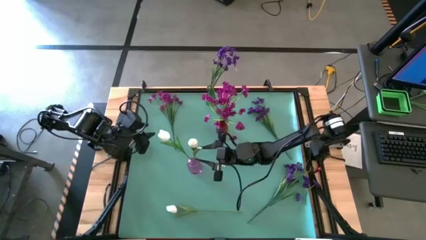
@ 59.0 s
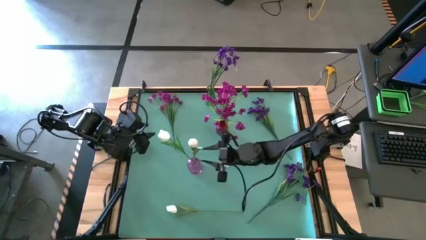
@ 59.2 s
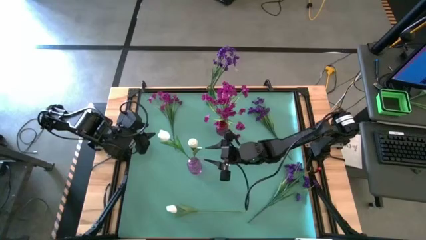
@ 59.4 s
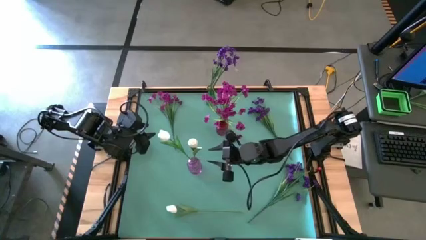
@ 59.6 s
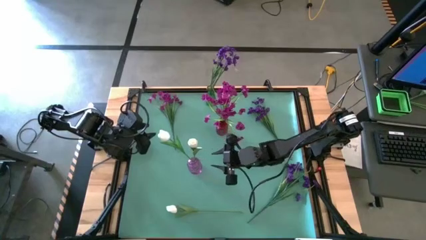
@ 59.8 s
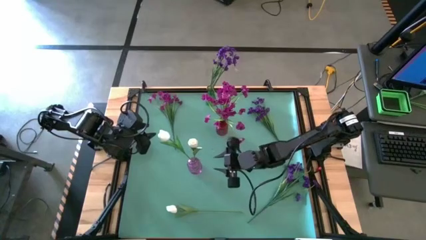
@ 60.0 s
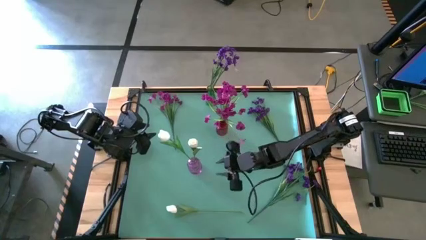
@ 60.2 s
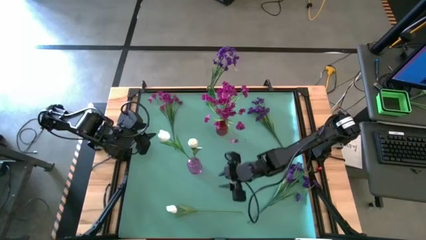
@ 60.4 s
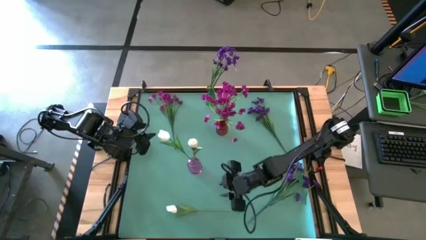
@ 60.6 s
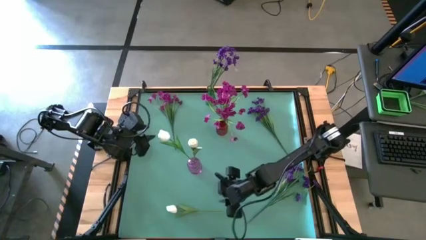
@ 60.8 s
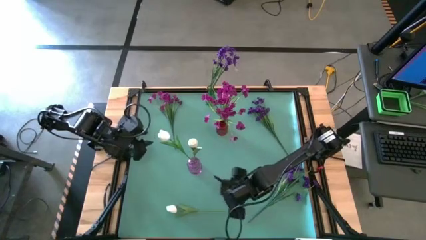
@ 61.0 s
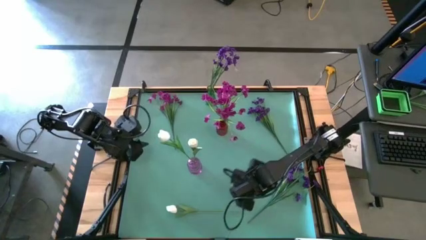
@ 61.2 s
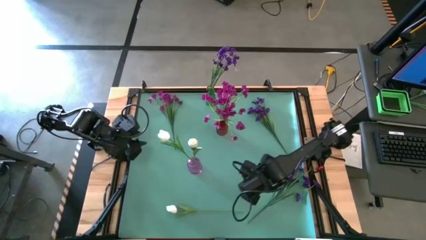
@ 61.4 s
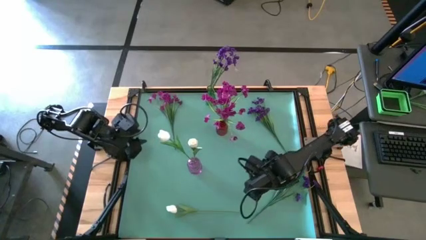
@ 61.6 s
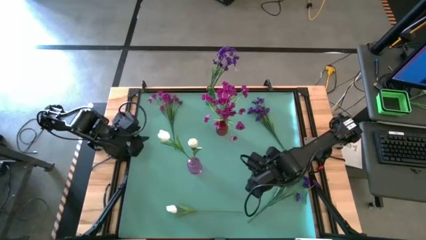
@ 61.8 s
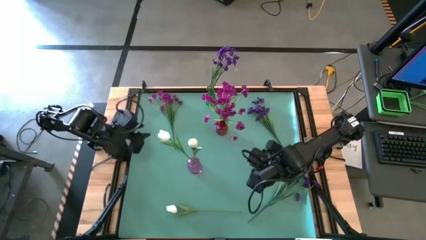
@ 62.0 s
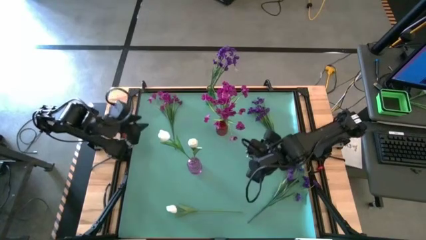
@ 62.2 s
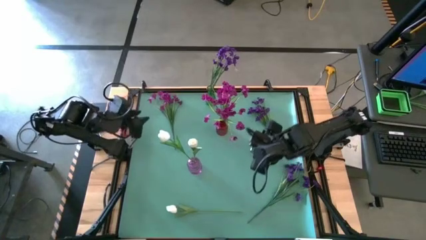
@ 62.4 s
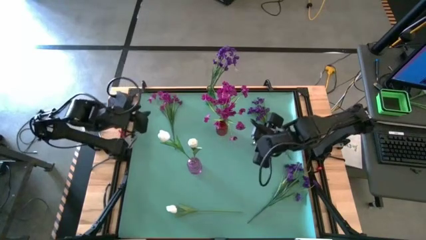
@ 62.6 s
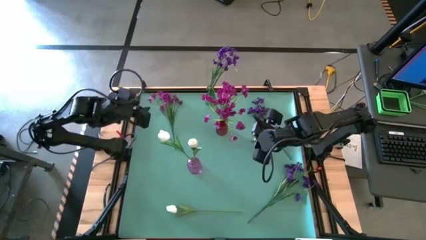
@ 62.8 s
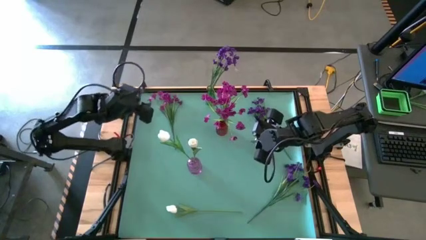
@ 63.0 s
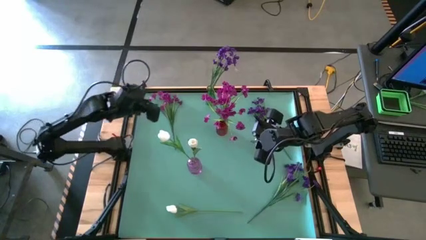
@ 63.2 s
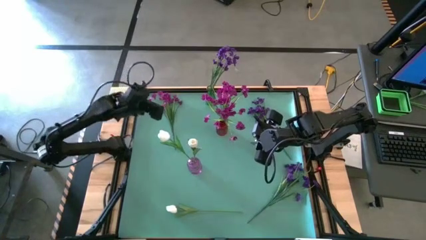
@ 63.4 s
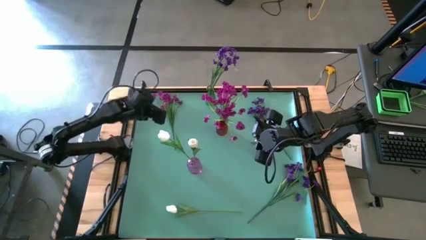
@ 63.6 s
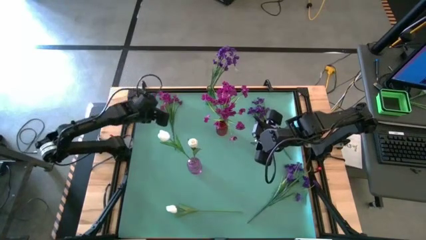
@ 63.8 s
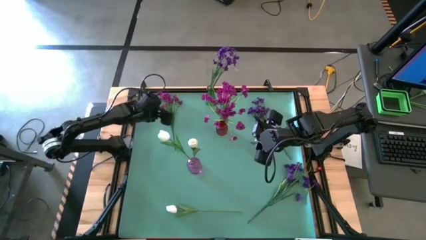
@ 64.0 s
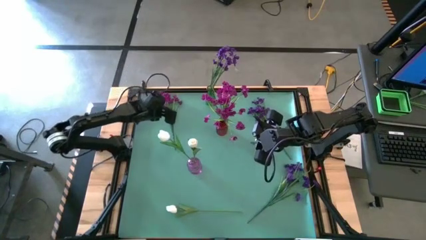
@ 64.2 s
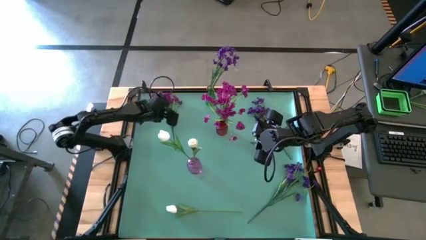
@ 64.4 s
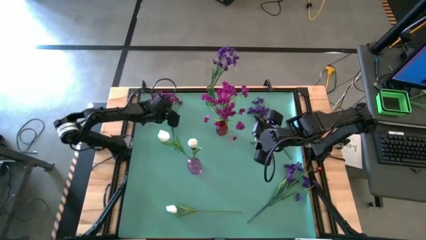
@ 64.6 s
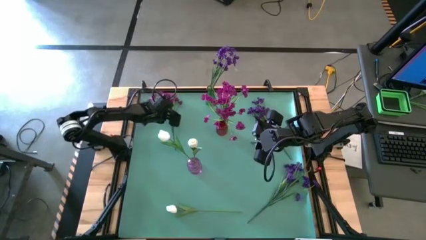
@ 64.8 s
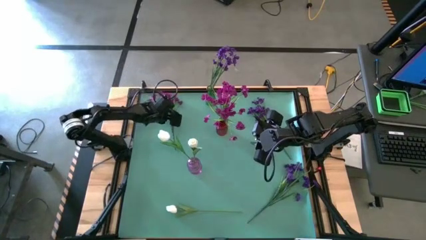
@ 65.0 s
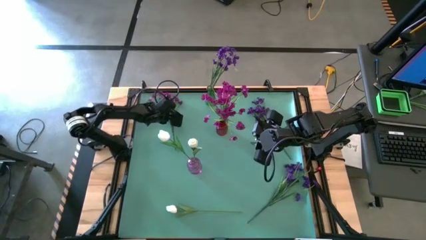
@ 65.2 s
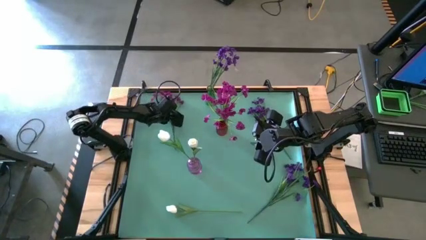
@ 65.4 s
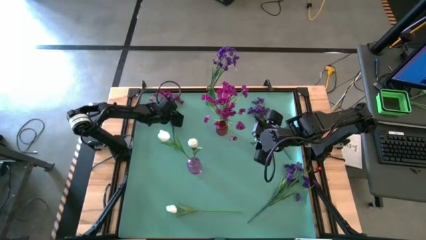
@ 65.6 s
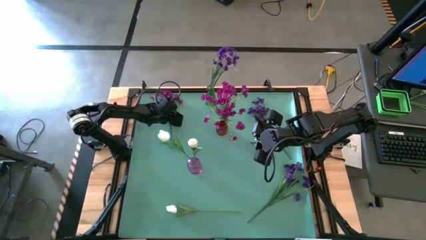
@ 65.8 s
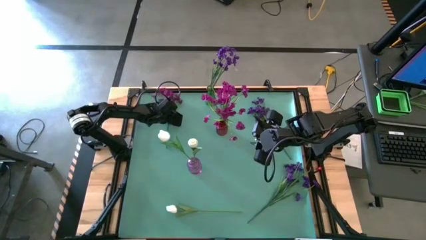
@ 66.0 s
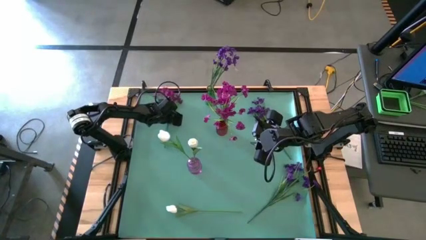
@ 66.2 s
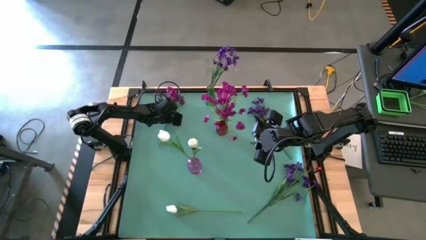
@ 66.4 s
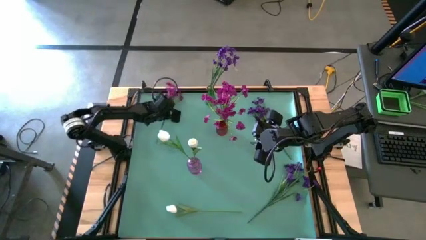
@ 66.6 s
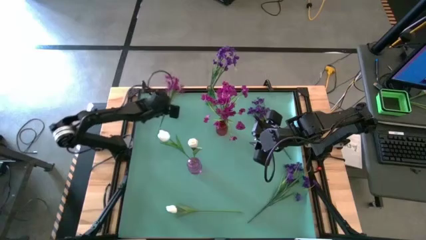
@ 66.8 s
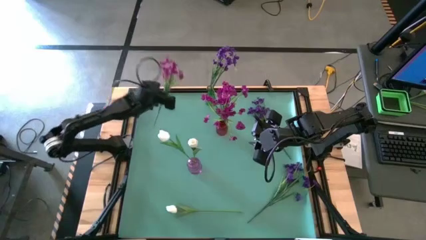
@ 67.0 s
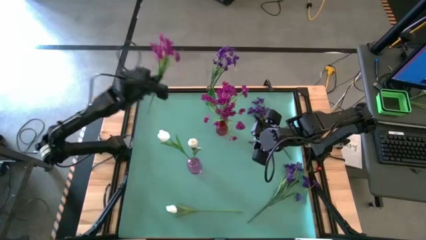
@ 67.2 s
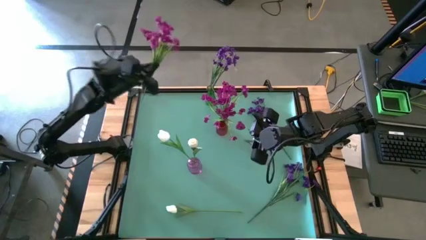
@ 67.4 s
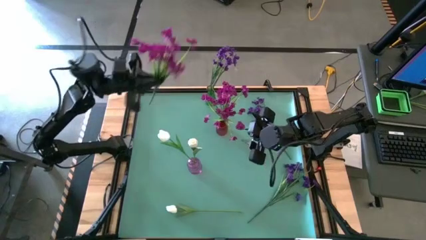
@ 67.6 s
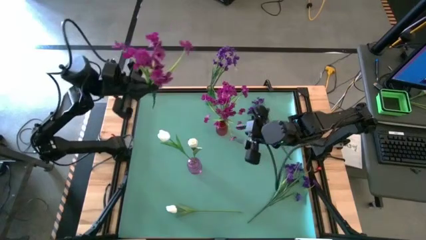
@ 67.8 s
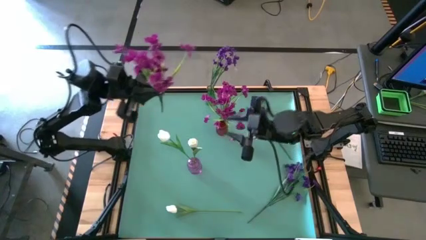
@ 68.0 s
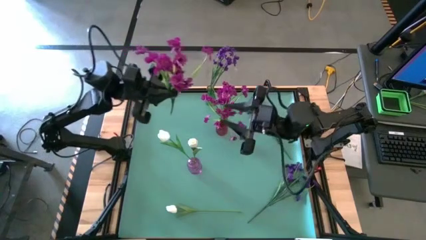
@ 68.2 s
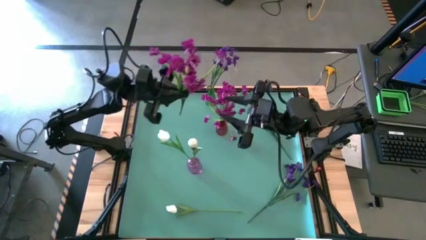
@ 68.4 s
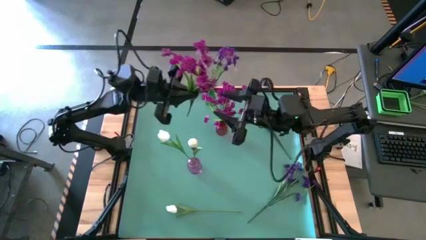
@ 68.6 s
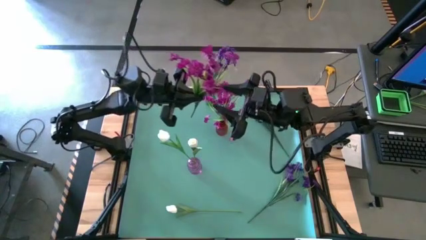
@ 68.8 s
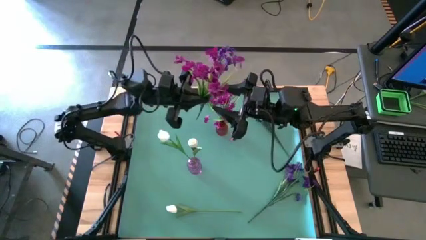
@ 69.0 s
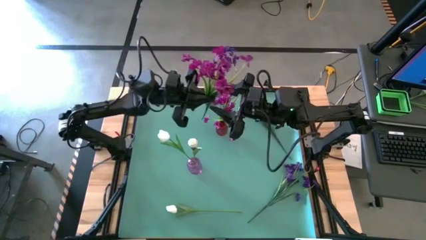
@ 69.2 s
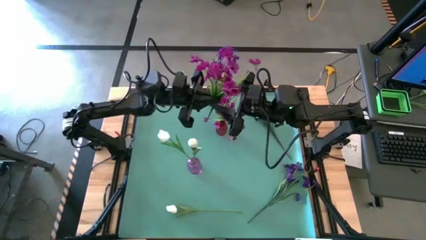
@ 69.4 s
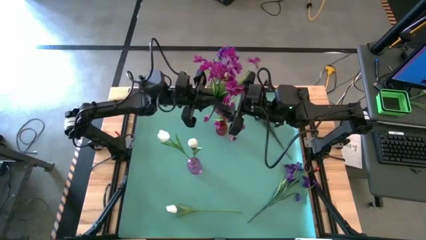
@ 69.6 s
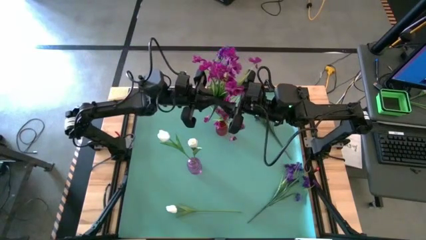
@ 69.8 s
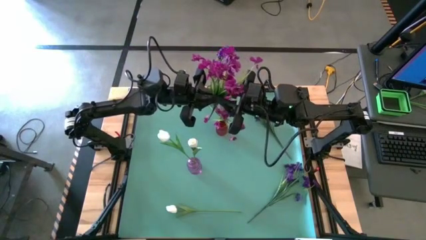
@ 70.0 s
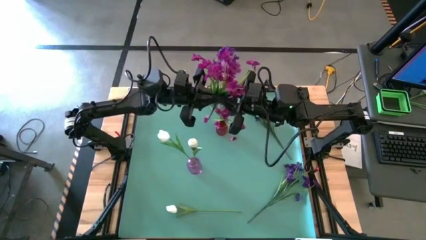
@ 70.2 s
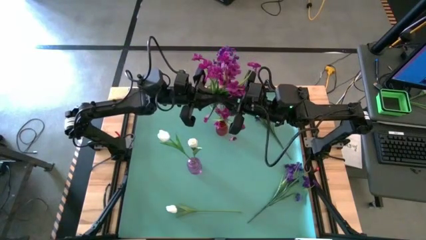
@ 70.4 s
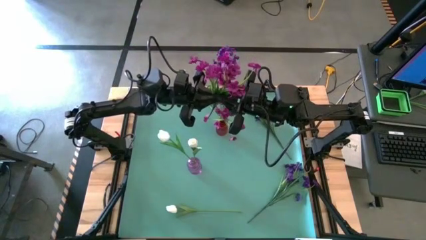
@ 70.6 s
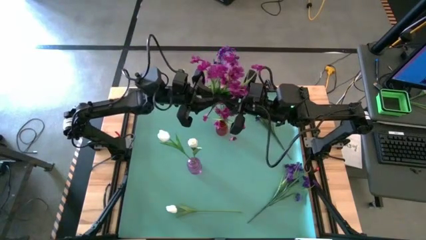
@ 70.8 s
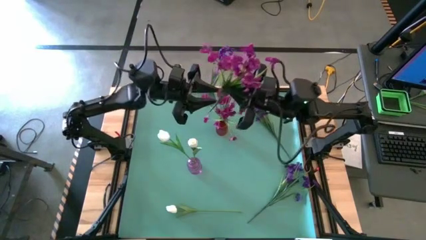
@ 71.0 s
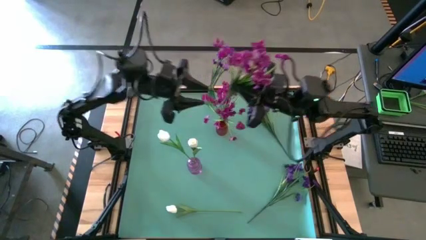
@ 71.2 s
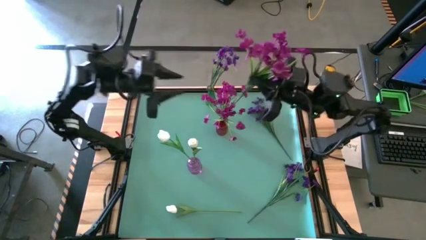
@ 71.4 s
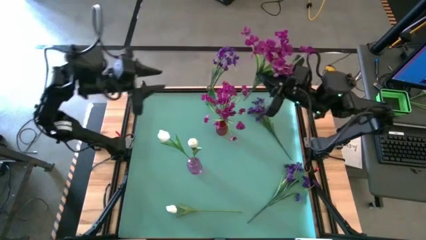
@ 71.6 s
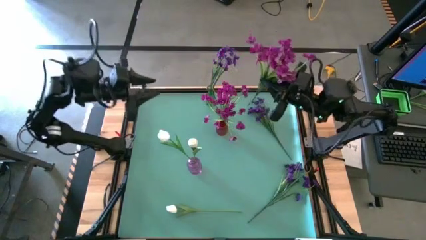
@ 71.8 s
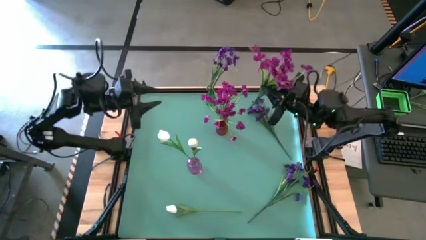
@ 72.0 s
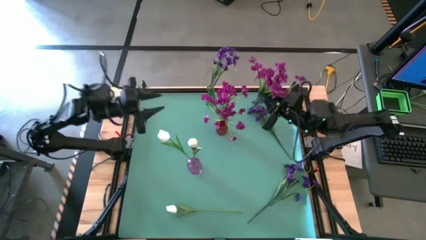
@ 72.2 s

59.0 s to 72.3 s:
Task: Sort flowers into vase by color
Put the pink flower into the red vase
